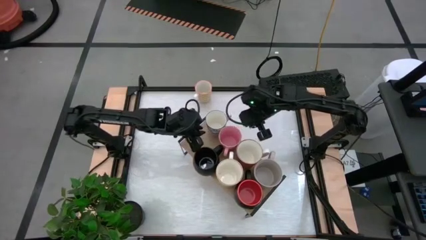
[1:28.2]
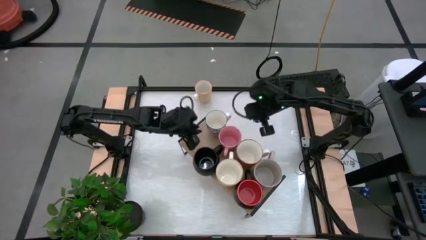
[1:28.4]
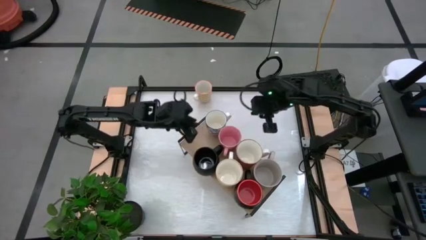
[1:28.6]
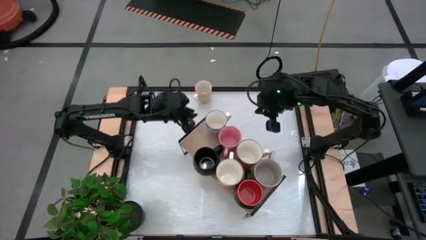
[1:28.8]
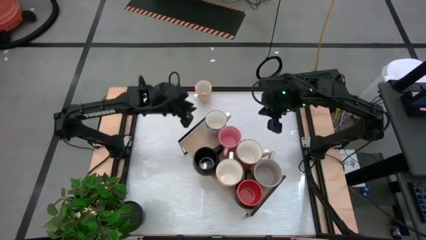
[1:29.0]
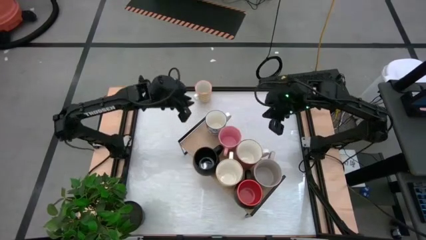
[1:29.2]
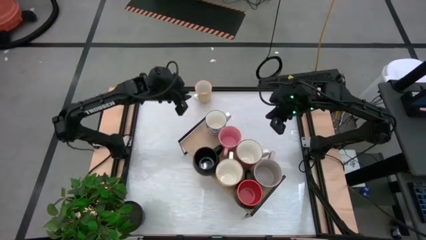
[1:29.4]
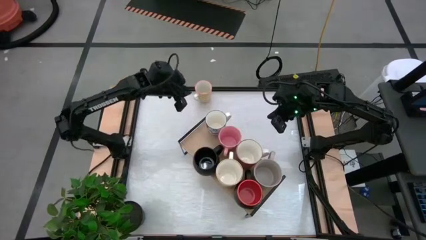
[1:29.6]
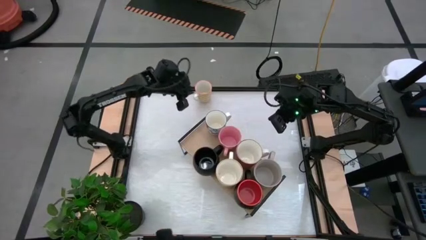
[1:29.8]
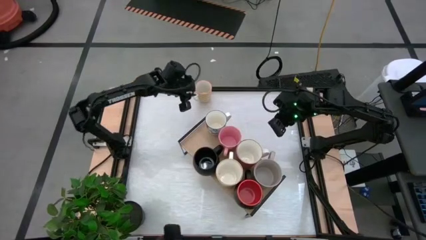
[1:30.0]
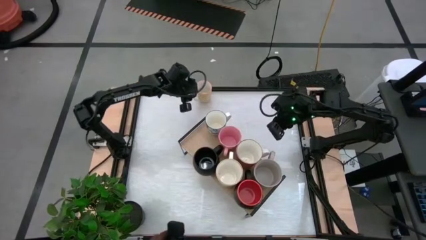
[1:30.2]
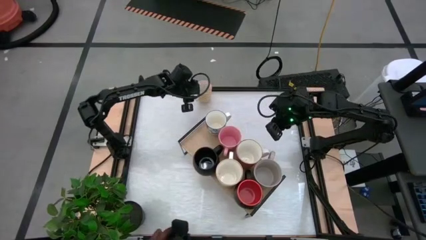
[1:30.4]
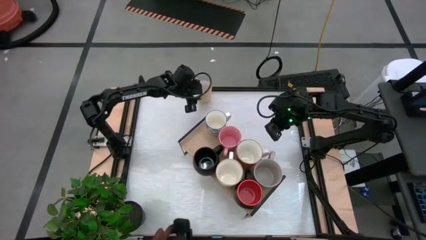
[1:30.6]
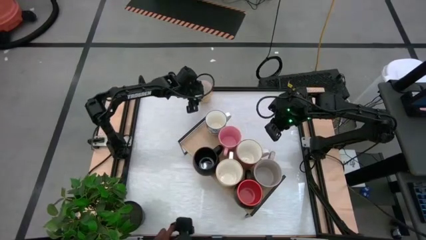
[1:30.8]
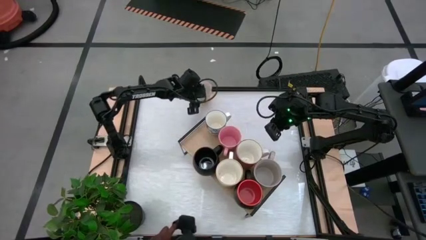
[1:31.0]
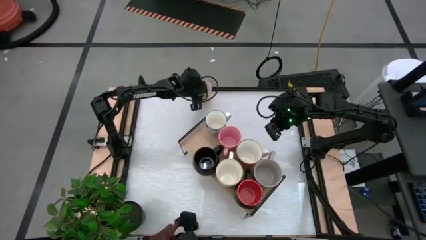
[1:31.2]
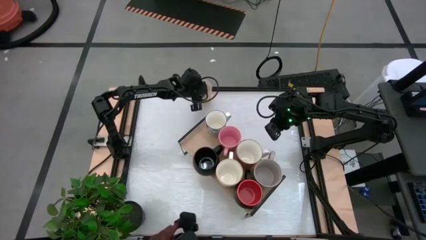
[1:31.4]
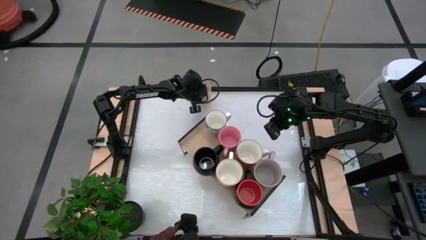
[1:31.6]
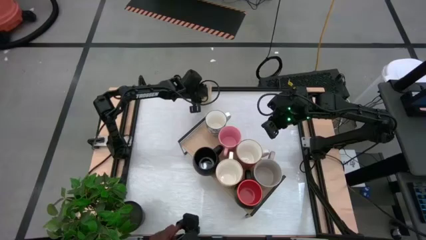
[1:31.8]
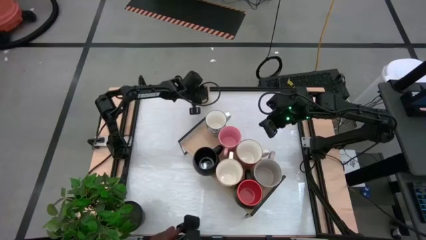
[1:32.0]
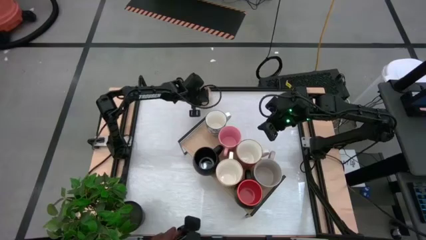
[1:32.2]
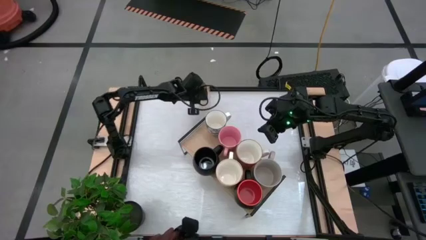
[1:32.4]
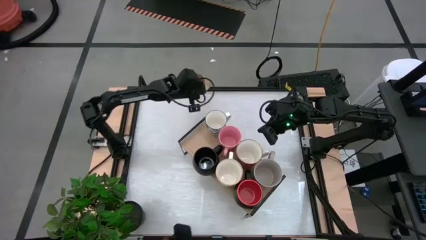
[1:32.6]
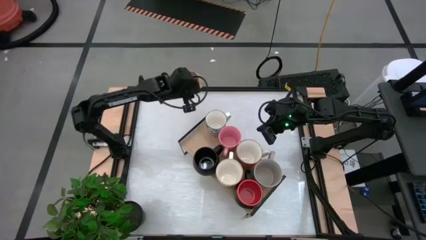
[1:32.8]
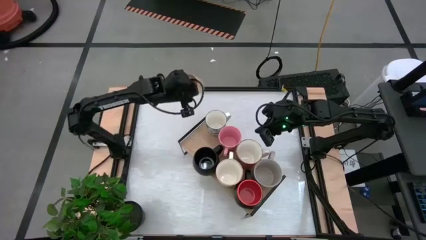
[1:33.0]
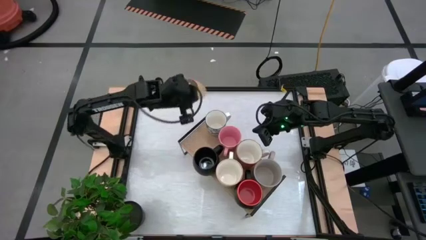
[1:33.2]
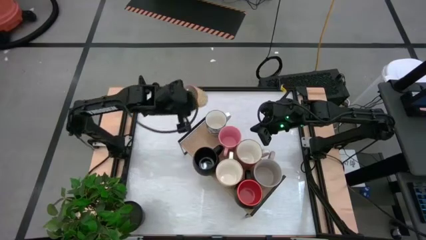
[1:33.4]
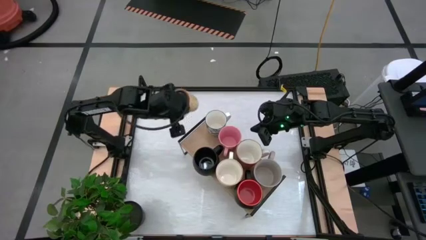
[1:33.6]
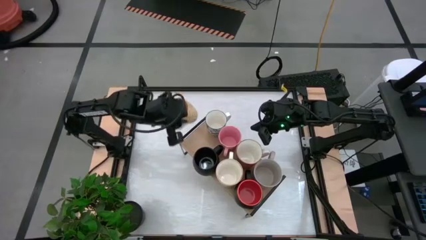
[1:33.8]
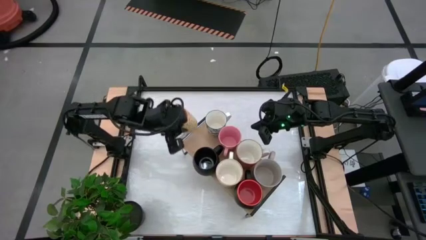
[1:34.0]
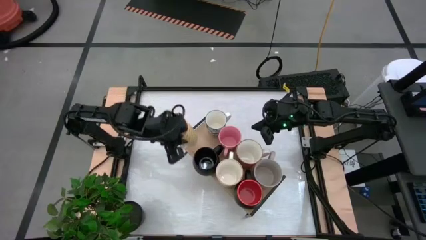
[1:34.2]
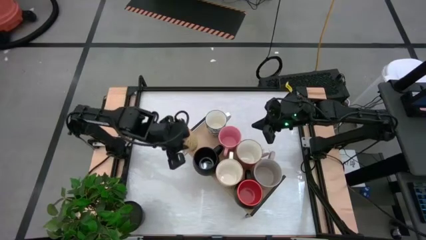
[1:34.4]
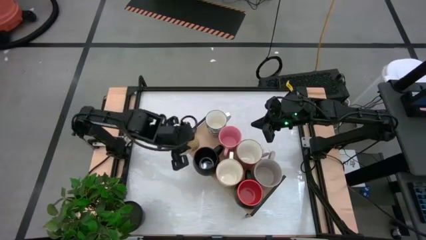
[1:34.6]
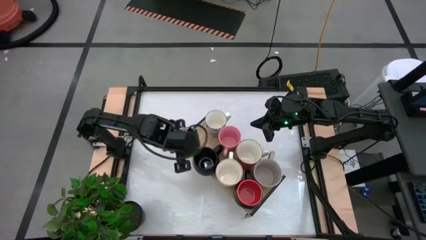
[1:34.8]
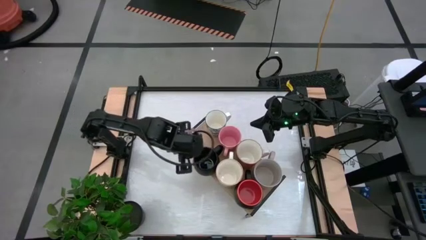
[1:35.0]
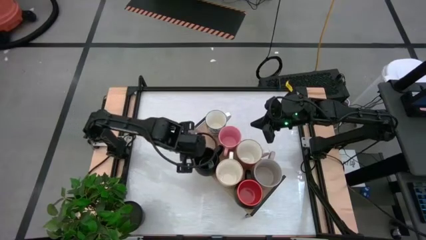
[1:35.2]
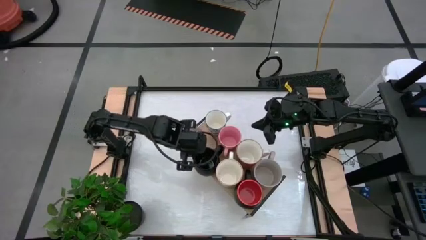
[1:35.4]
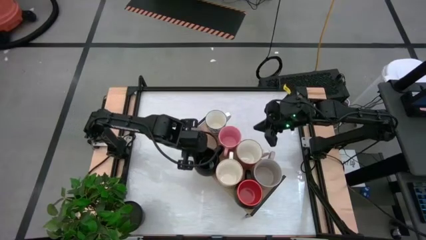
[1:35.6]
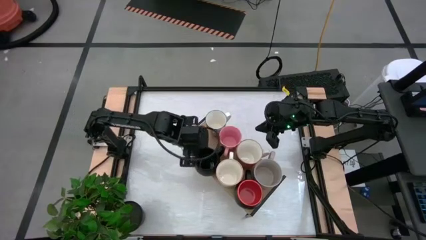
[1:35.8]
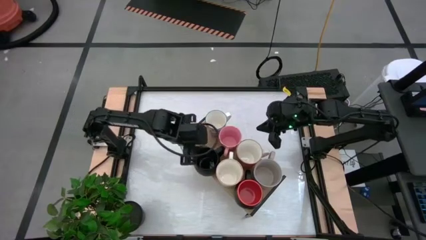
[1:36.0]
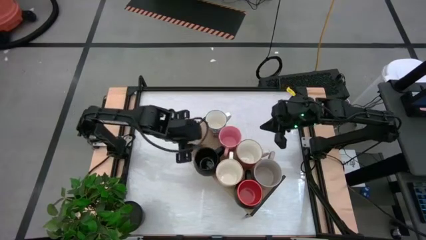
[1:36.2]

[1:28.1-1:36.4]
Task: Place coffee mugs
Put the yellow-white mug on the shelf

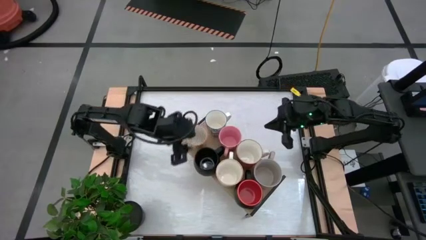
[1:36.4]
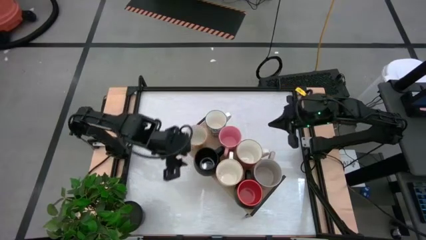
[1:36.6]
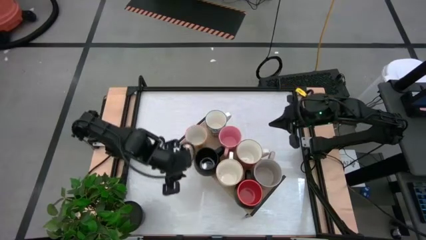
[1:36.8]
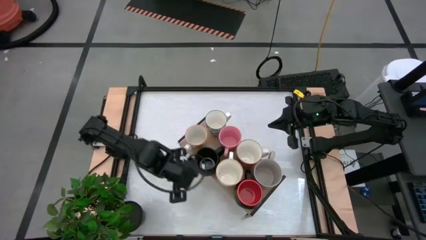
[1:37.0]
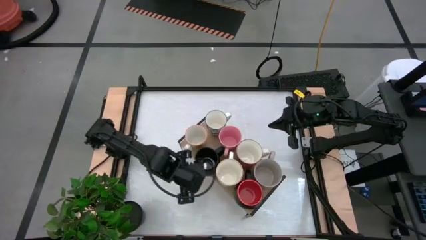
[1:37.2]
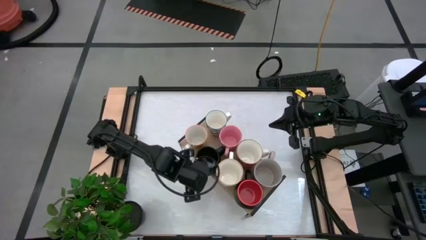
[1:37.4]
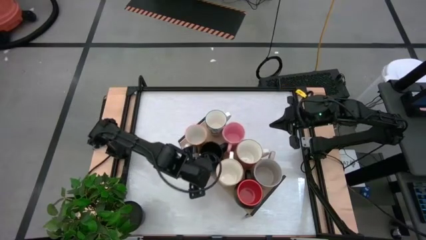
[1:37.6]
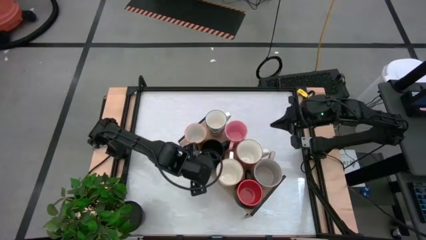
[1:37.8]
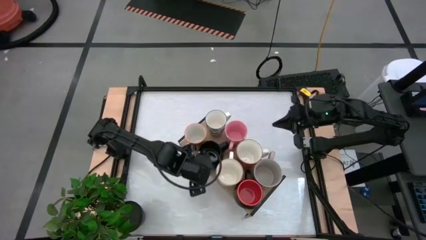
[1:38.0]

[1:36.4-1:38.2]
Adjust the black mug on the shelf

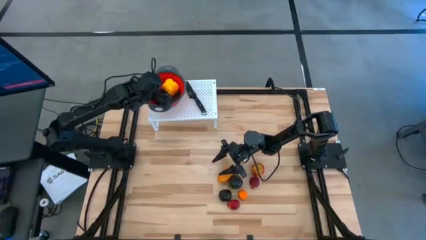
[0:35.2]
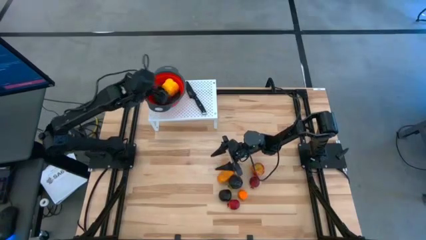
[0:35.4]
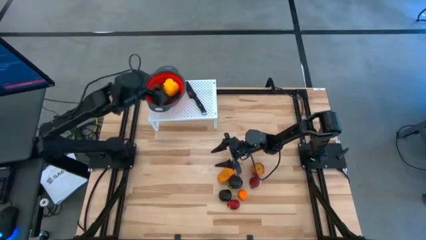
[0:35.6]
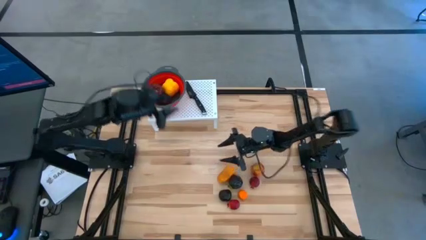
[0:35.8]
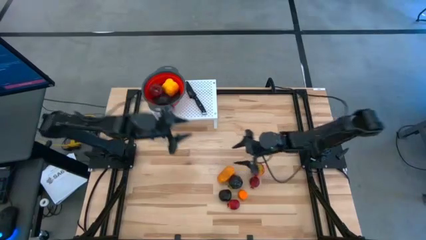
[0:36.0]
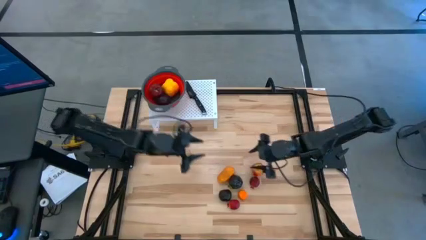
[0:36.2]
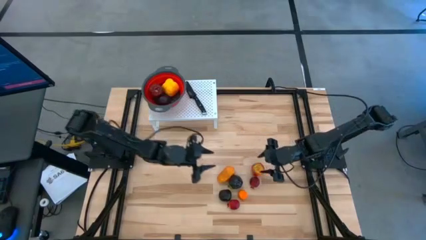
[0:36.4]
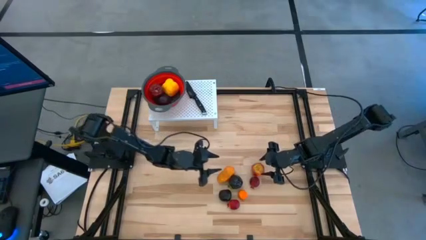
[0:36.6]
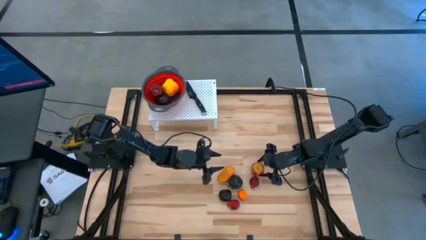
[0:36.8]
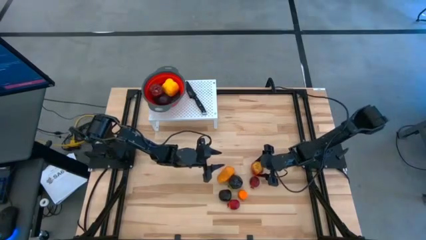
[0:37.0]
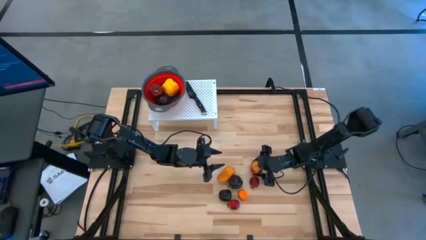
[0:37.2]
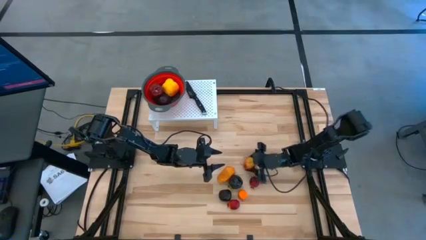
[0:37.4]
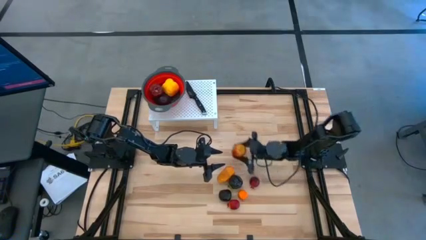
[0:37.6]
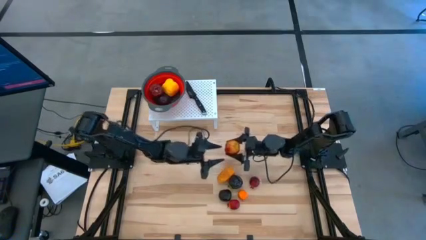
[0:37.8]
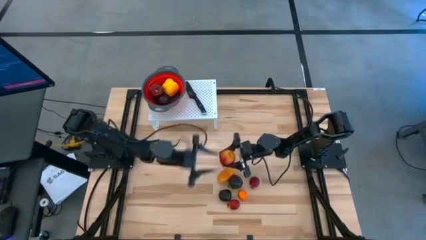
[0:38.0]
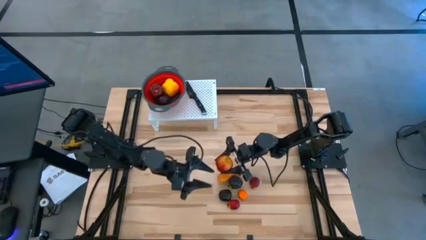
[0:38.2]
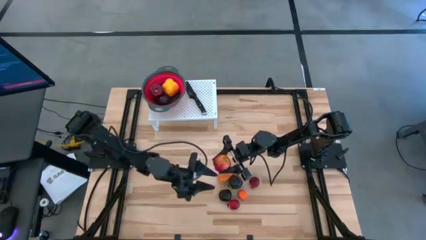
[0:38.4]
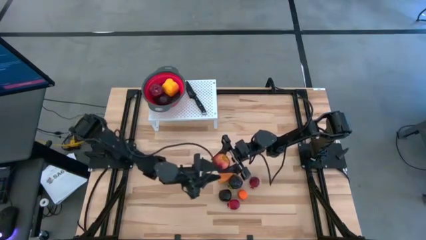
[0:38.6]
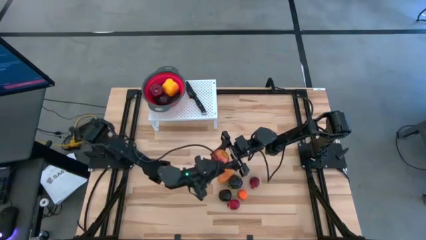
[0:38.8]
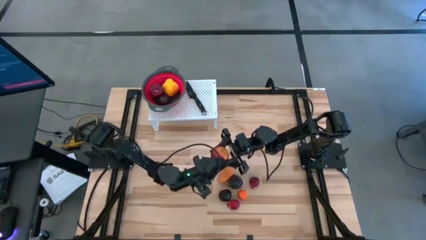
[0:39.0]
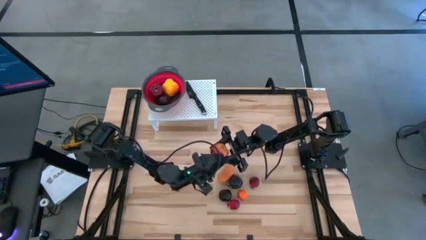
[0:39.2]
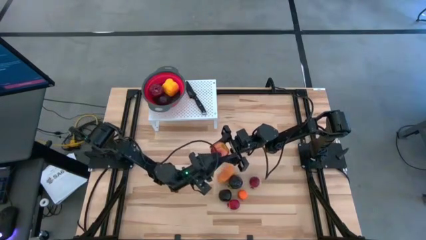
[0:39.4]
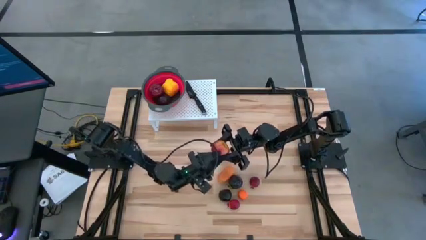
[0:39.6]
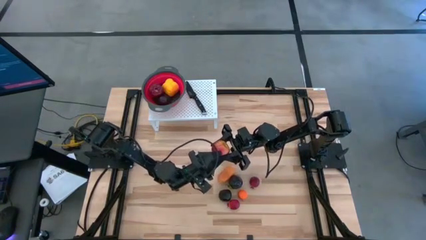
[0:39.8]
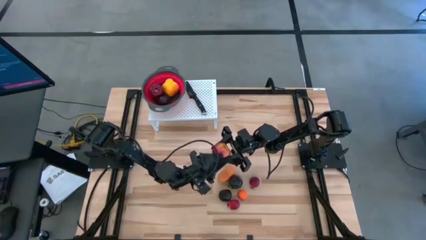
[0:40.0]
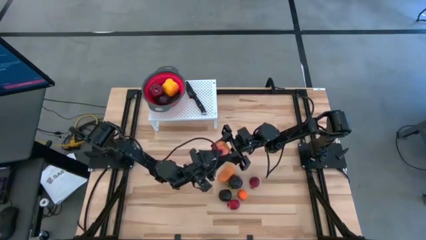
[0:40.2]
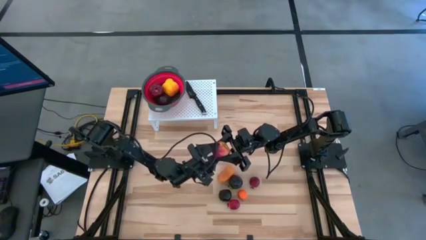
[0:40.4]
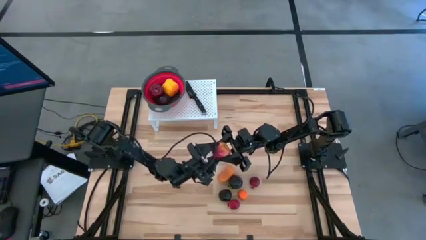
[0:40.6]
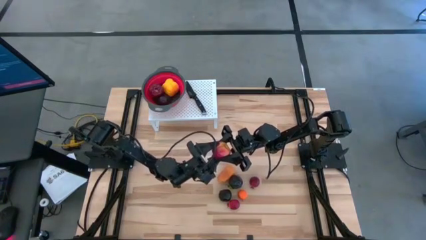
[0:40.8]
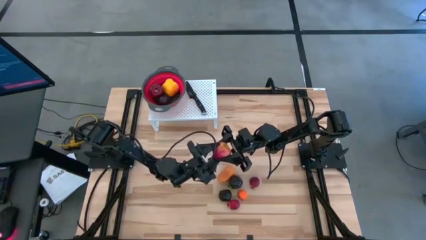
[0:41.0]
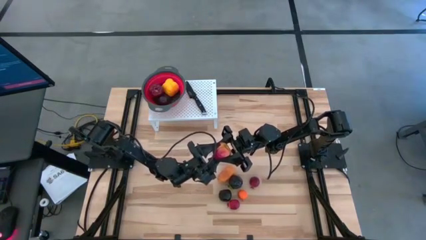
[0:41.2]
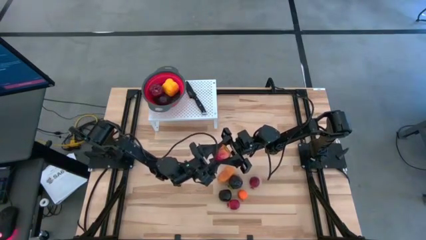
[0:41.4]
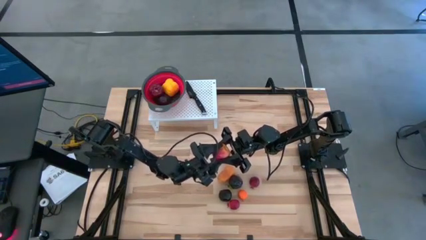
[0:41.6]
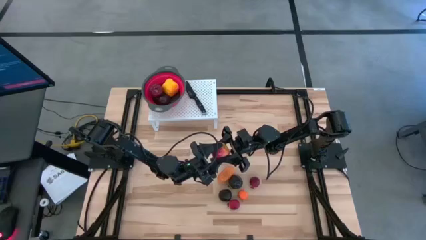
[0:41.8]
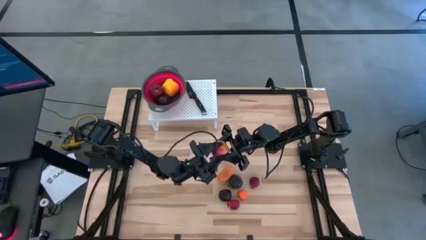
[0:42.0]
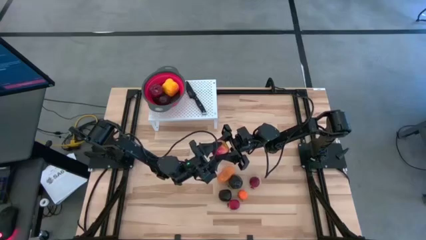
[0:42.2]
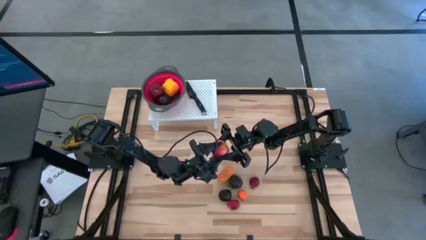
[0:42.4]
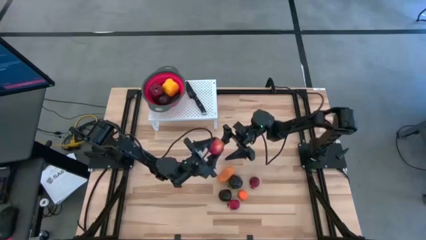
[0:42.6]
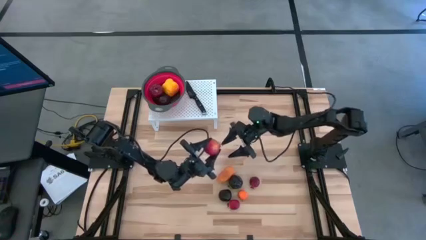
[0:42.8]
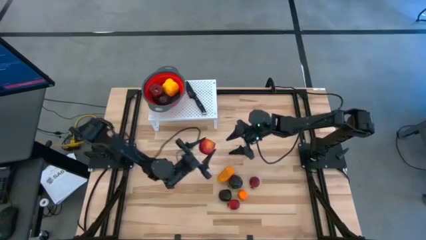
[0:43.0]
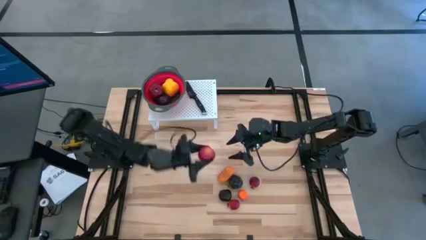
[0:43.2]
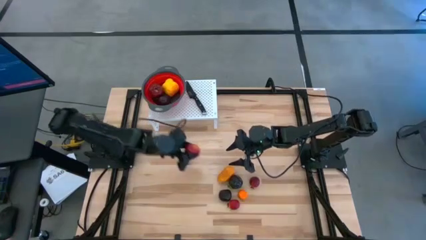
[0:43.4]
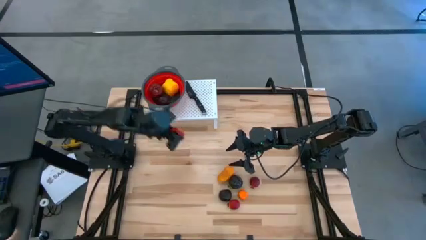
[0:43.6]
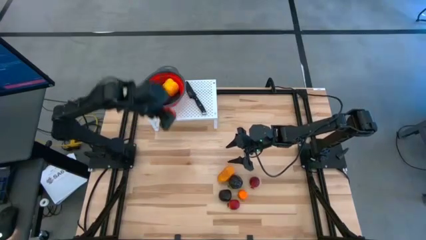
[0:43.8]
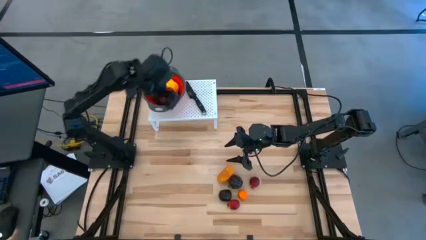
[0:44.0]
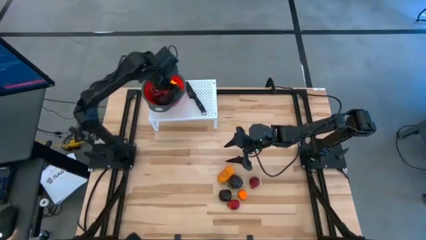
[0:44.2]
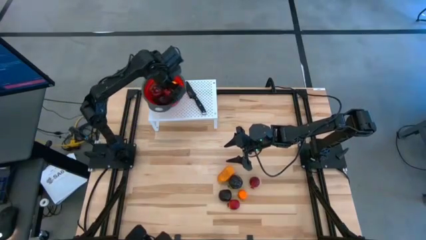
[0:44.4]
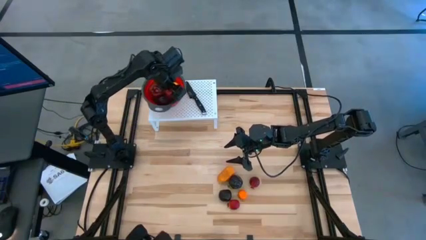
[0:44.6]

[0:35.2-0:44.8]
Task: Pick & Place Fruit
Put the red apple into the red strainer bowl on the shelf
